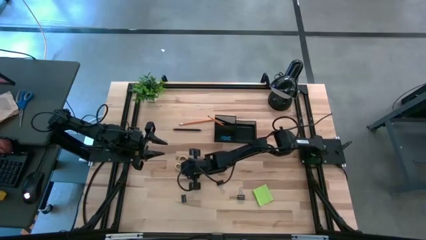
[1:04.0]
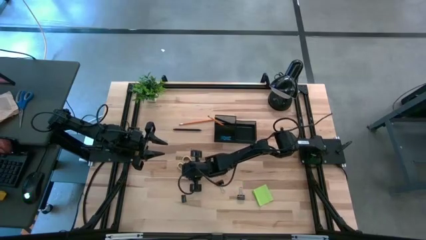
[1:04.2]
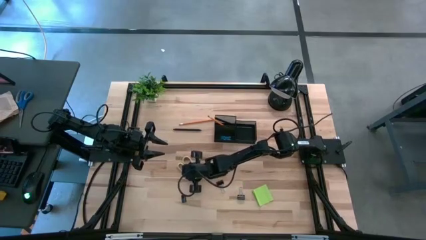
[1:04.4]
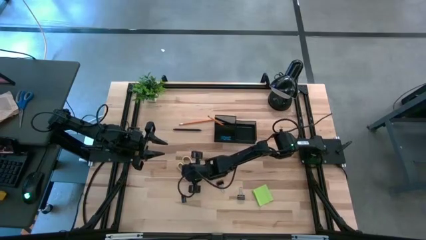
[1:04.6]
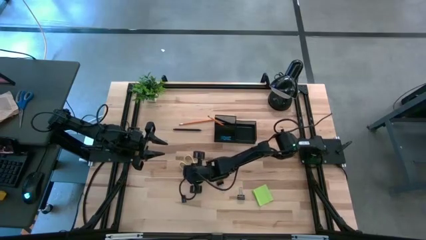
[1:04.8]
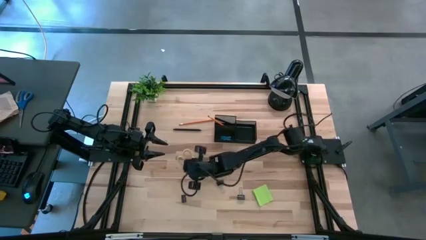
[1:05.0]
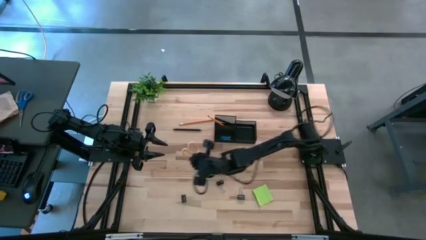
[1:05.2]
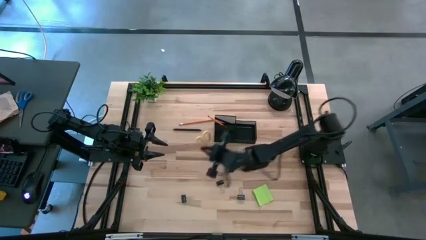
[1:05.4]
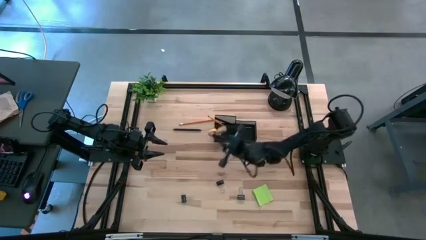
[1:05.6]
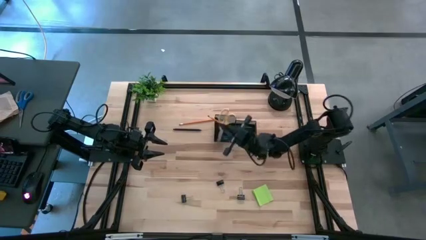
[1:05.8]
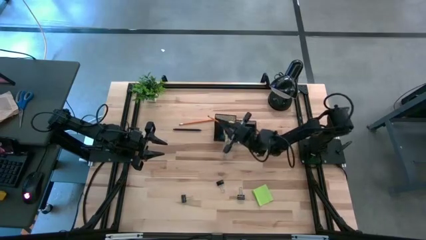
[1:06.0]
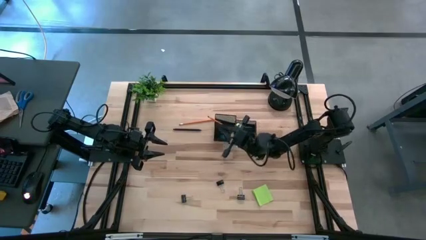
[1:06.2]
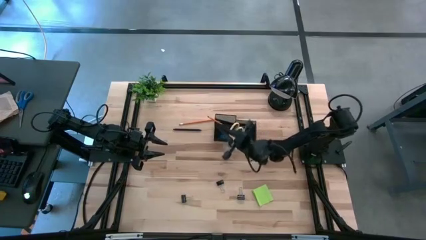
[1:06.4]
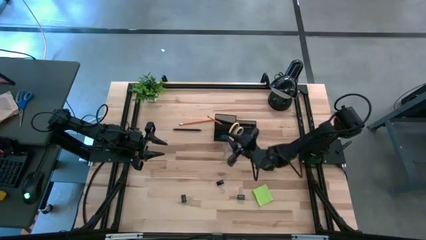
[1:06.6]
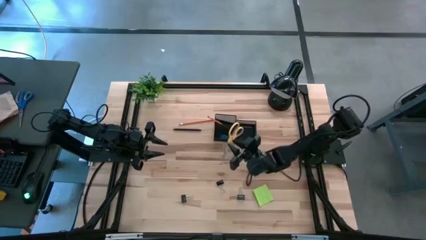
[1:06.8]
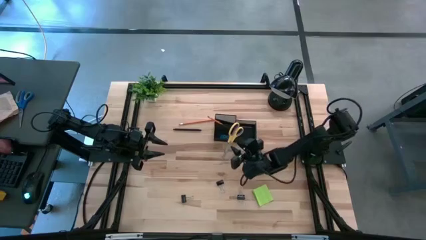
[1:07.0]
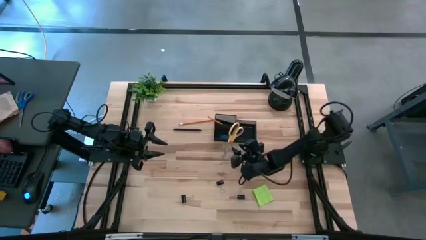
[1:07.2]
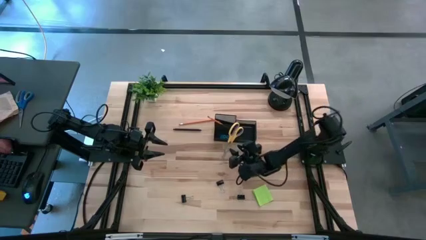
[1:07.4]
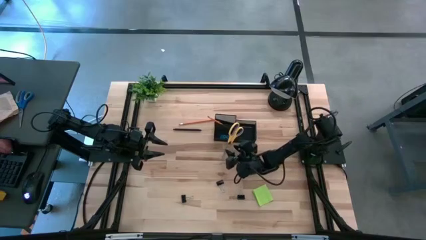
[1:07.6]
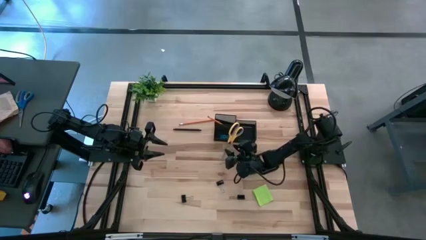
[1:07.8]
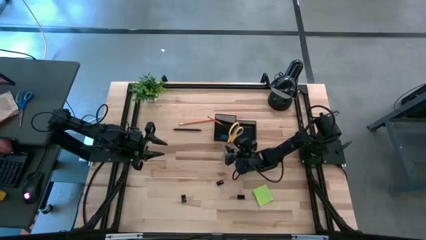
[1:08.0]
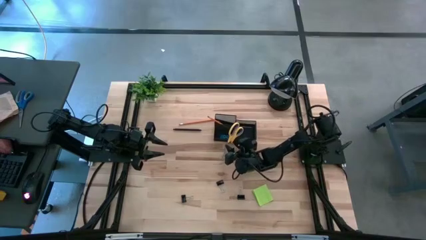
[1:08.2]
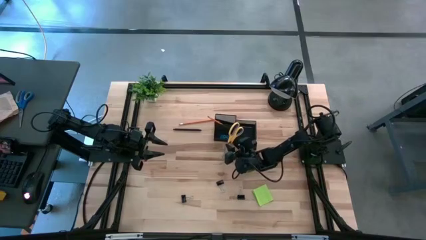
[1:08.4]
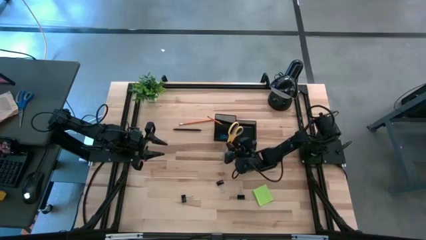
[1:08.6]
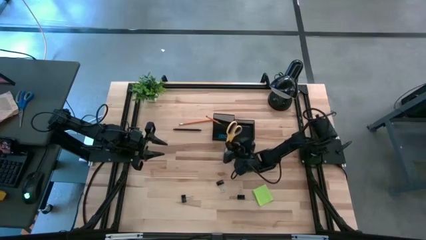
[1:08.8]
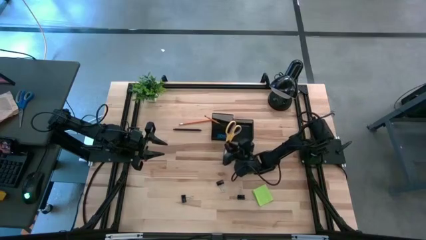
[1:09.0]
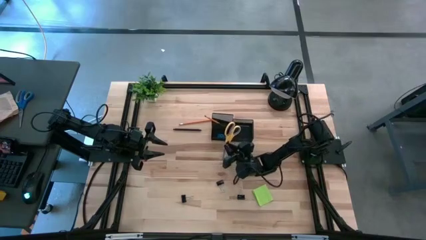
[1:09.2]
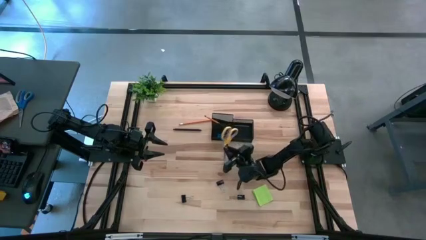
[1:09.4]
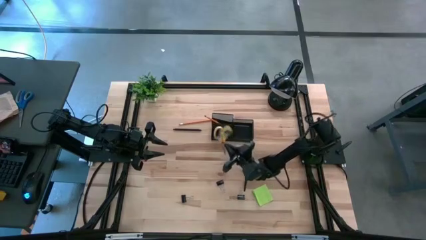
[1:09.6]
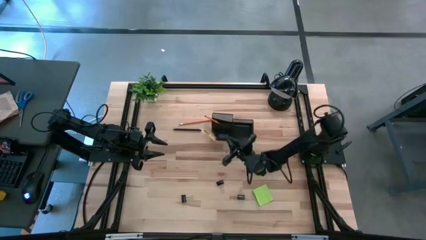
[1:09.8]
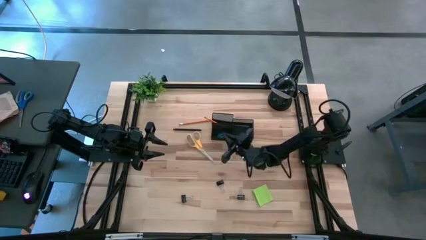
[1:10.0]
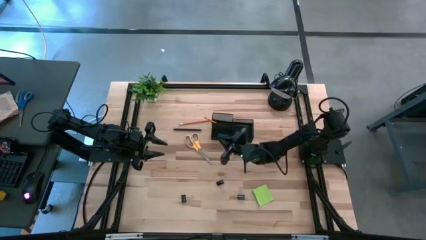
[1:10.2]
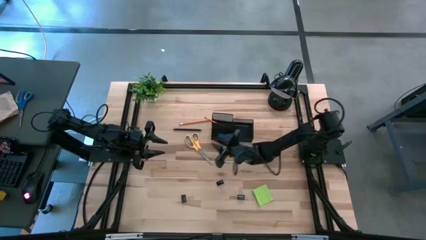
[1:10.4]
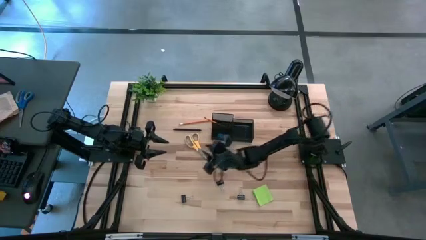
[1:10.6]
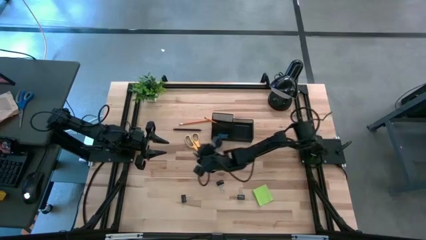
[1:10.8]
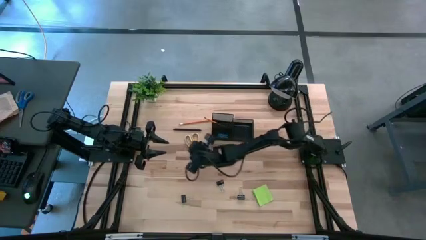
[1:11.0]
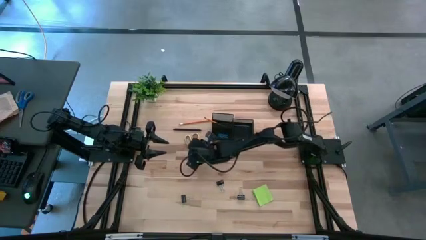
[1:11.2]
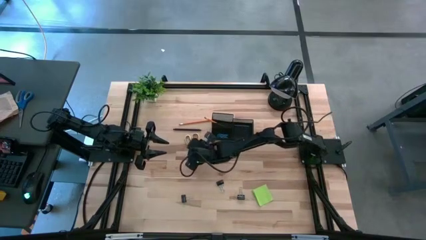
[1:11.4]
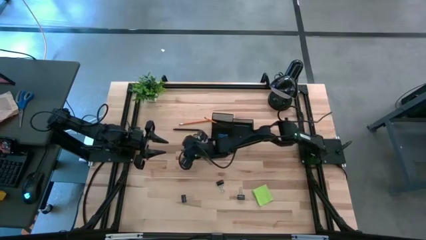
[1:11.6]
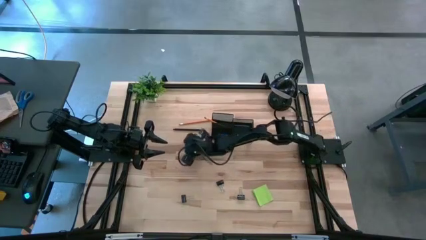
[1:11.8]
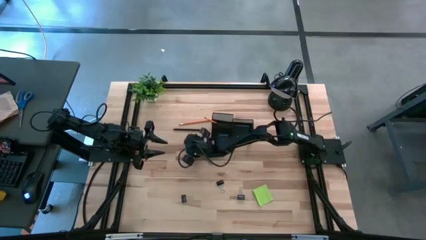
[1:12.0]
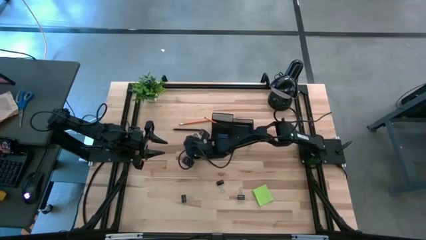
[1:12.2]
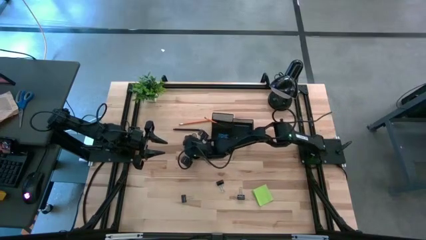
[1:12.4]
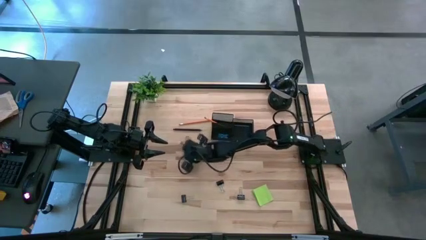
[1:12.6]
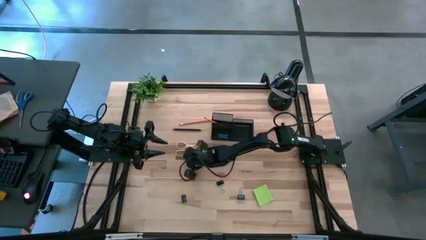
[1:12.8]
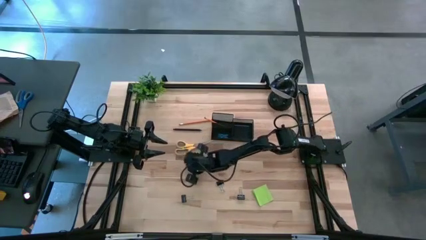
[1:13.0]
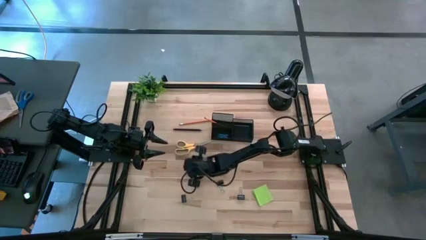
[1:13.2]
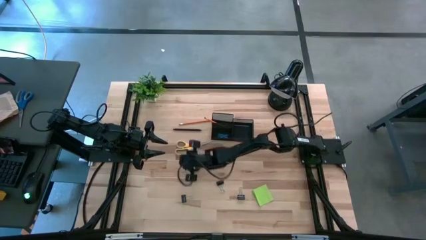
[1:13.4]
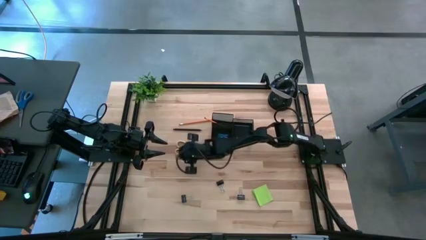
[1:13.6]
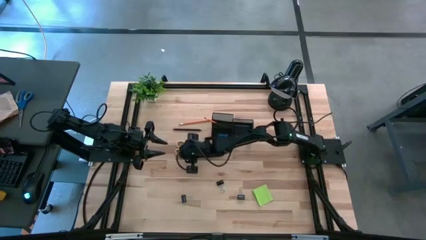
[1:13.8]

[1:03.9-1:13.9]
Task: Pick and place office supplies into organizer
Put the yellow scissors into the desk organizer

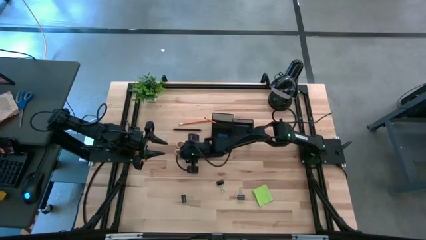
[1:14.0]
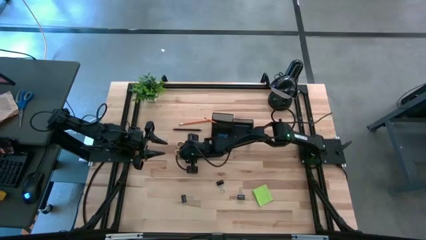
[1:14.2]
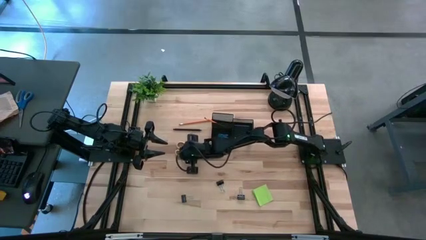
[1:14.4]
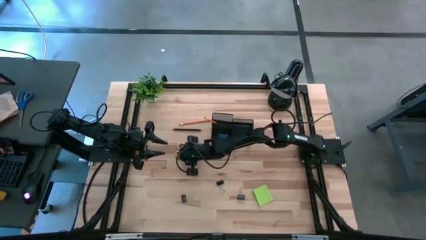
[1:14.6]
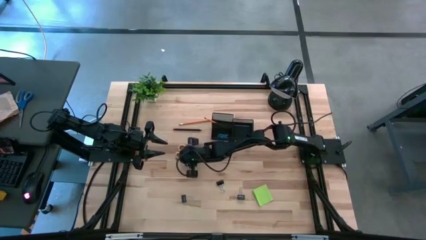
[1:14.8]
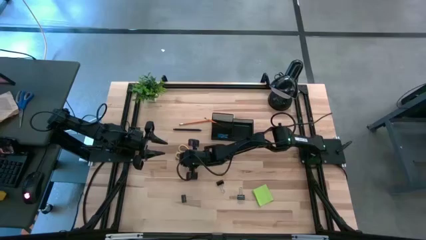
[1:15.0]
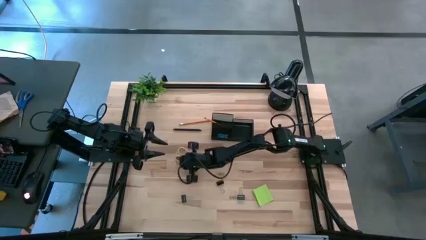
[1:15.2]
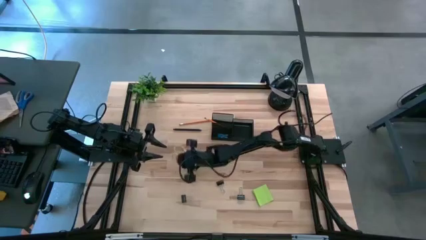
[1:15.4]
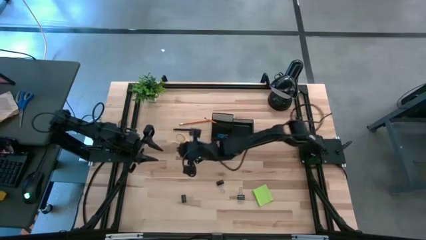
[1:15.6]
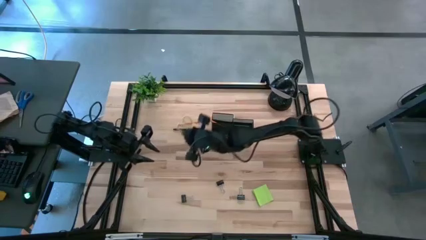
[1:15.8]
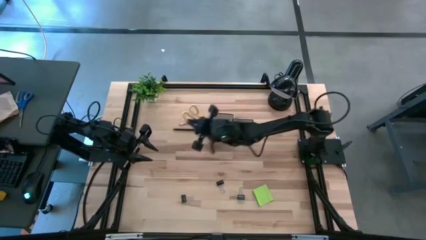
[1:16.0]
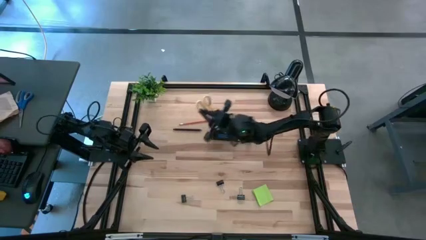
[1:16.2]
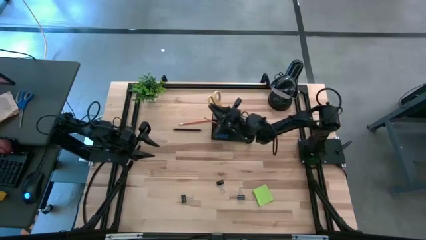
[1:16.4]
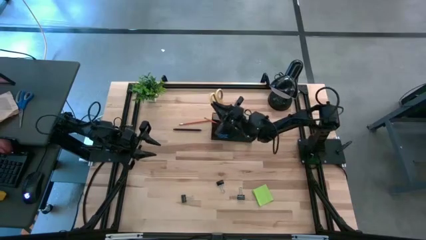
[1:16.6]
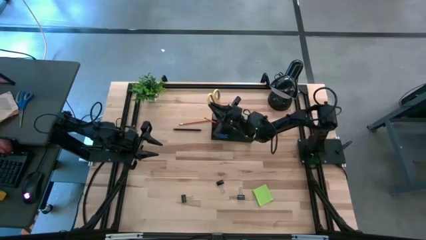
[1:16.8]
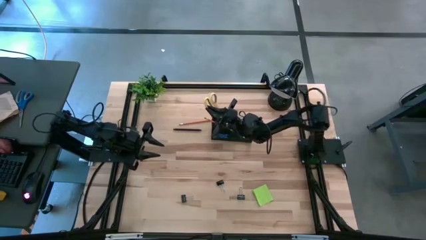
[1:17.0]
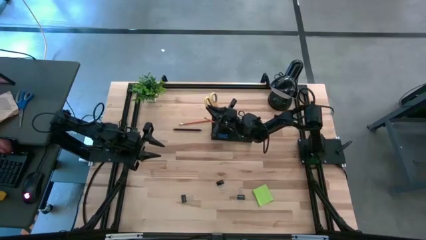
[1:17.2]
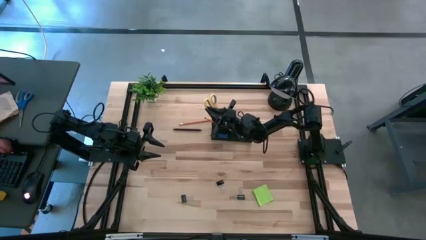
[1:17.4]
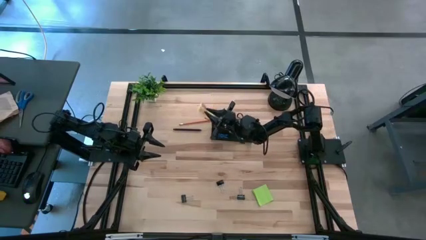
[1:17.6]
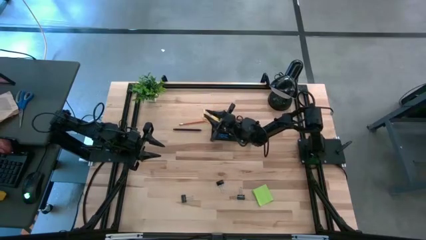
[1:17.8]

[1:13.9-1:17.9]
Put the yellow scissors into the desk organizer

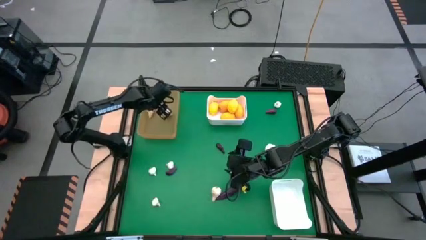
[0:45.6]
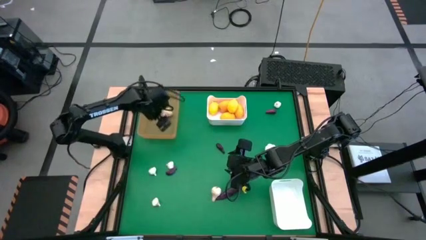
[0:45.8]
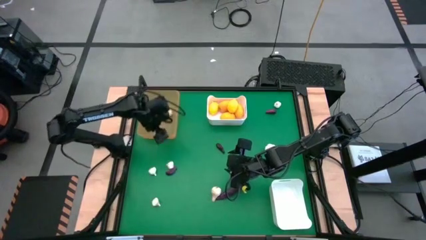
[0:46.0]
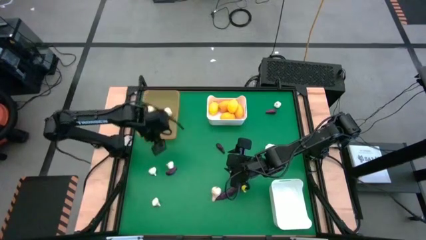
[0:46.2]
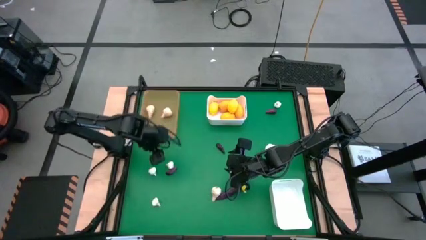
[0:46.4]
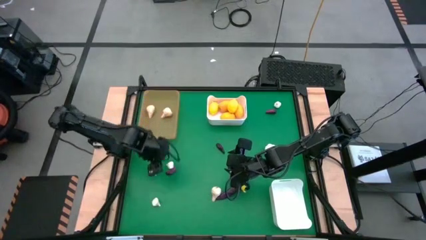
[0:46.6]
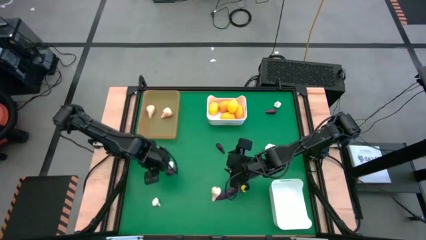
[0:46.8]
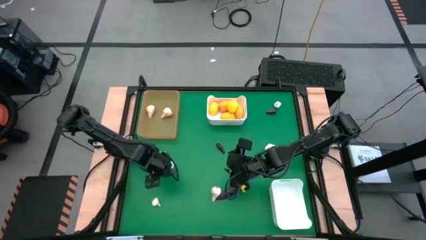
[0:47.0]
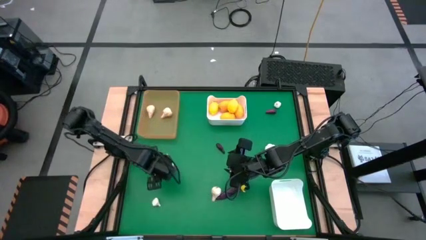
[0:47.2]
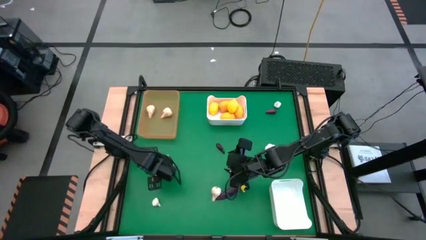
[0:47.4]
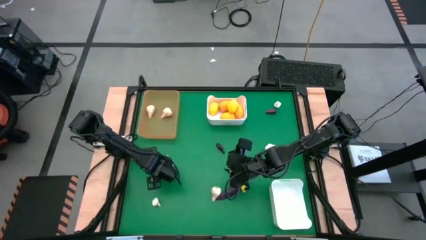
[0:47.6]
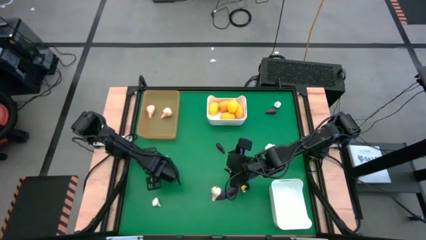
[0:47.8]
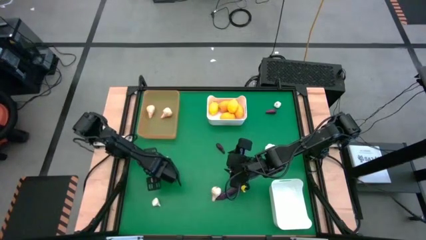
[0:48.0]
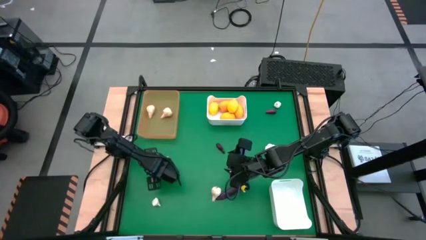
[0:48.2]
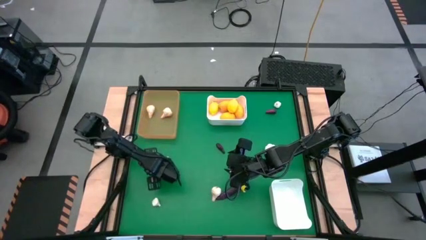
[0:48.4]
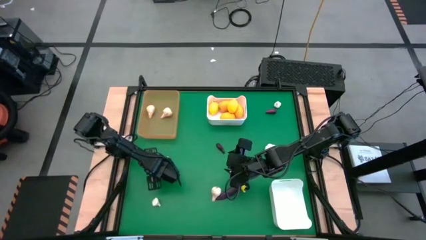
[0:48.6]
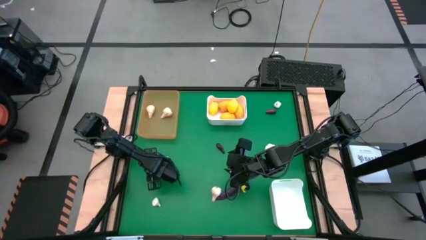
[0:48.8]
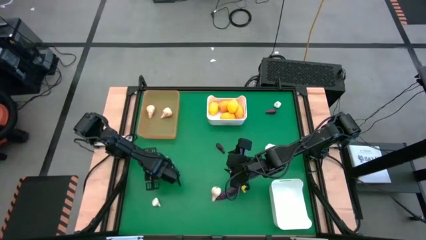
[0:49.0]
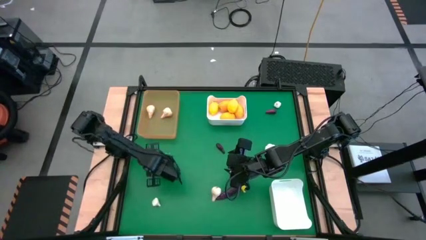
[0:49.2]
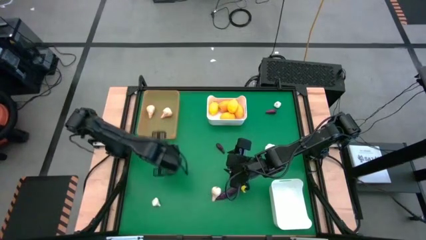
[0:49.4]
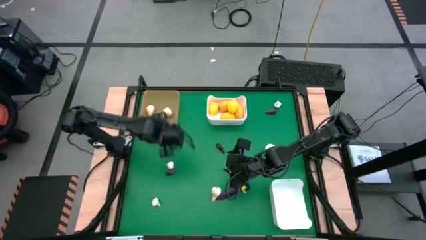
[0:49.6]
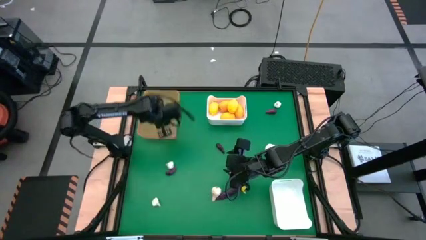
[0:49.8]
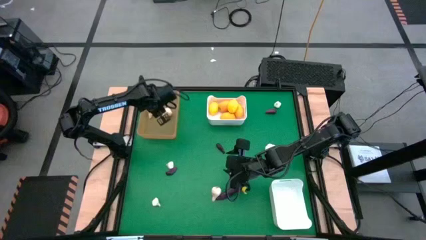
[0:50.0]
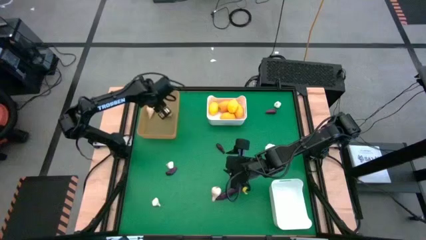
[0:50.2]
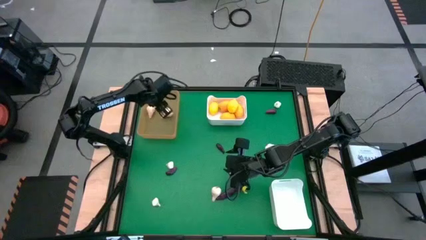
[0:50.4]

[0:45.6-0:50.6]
Task: Sort produce into baskets
Put the garlic into the orange bin
